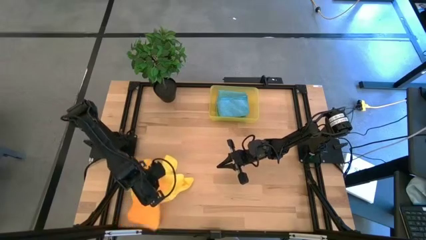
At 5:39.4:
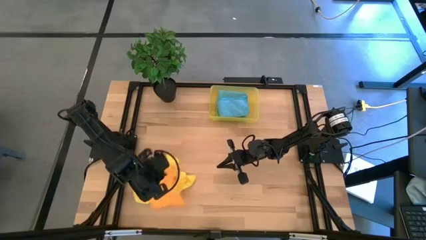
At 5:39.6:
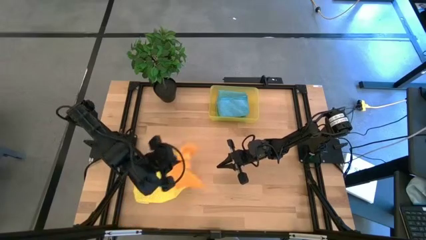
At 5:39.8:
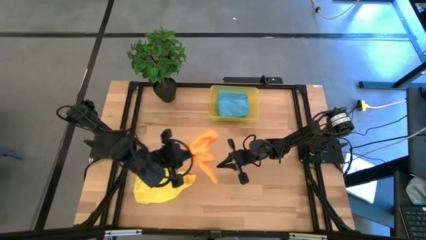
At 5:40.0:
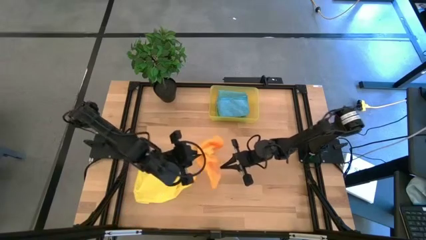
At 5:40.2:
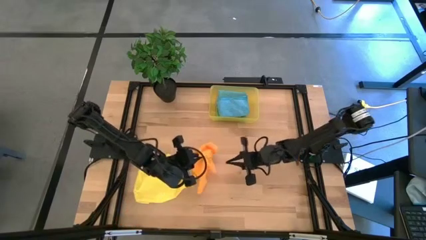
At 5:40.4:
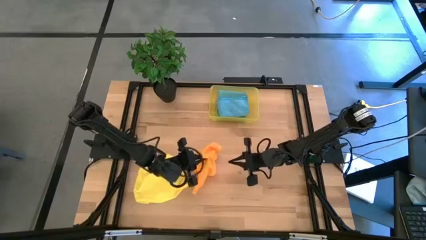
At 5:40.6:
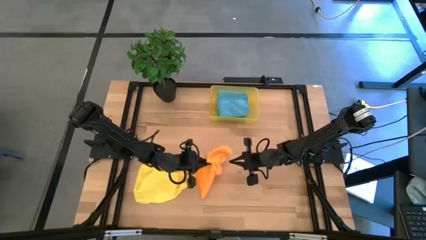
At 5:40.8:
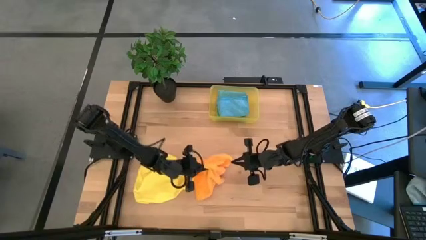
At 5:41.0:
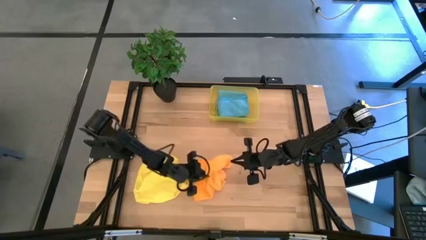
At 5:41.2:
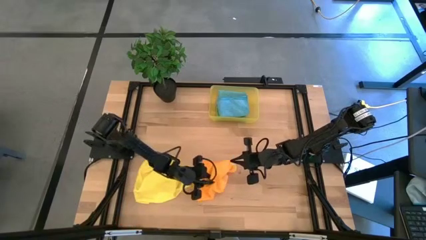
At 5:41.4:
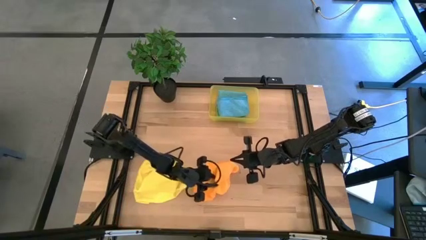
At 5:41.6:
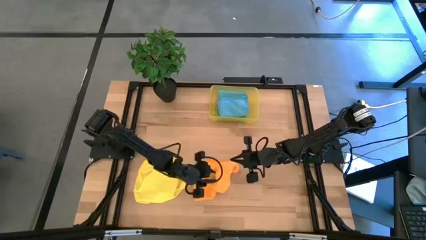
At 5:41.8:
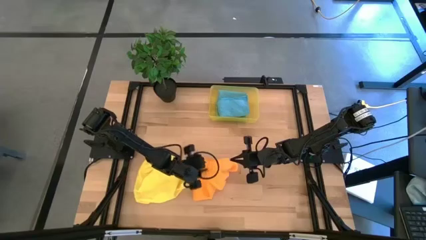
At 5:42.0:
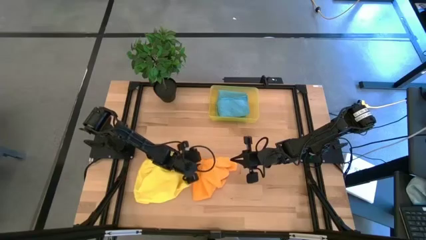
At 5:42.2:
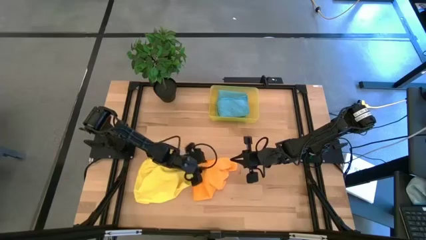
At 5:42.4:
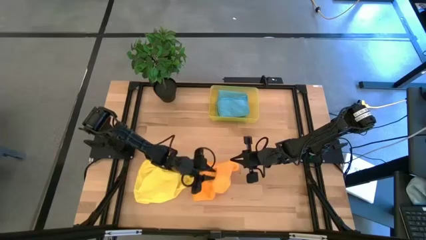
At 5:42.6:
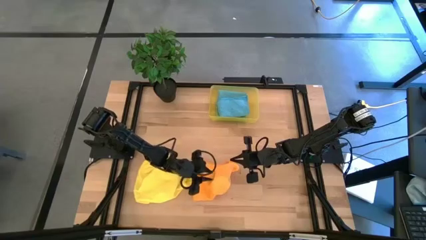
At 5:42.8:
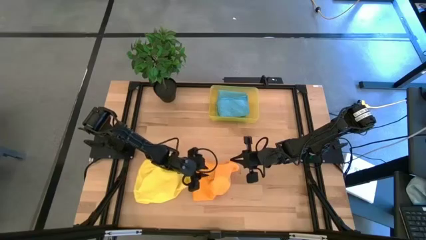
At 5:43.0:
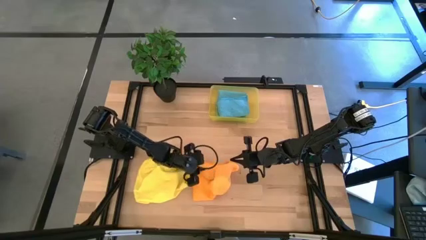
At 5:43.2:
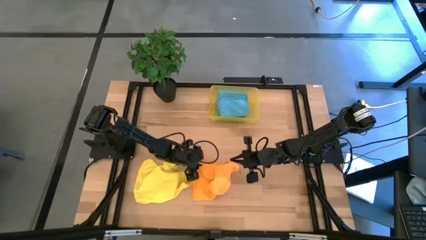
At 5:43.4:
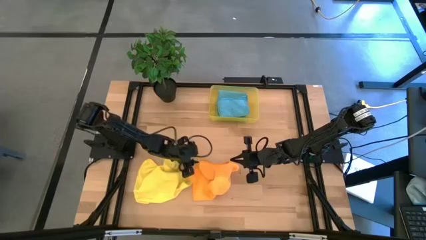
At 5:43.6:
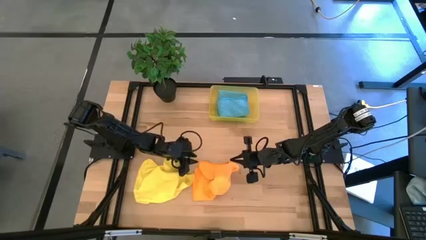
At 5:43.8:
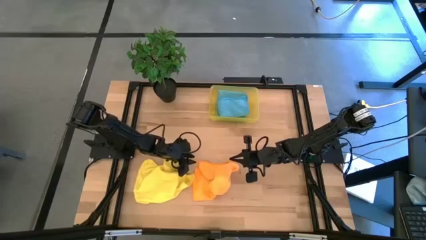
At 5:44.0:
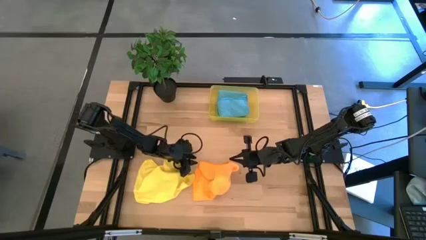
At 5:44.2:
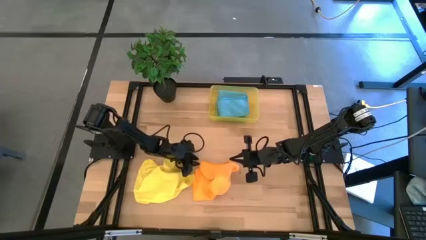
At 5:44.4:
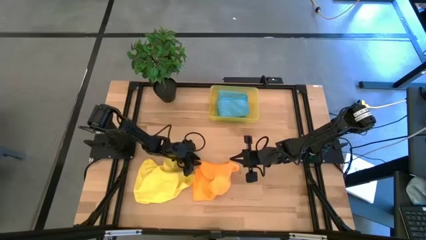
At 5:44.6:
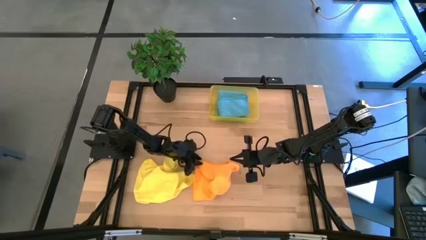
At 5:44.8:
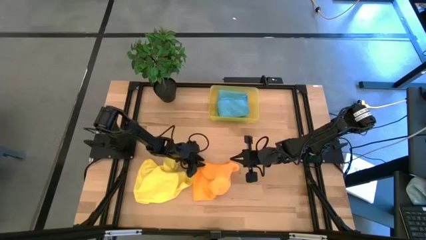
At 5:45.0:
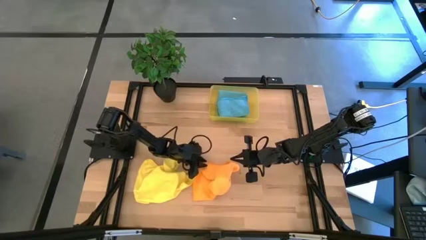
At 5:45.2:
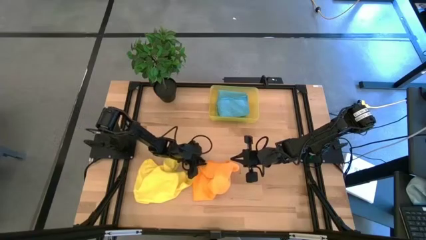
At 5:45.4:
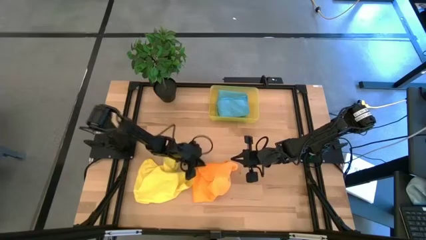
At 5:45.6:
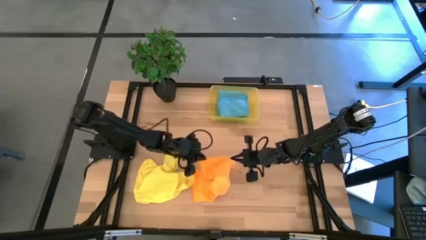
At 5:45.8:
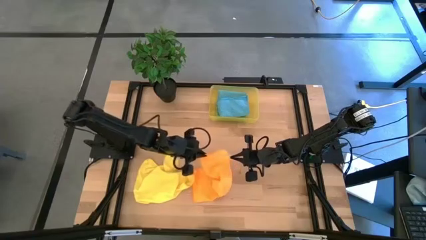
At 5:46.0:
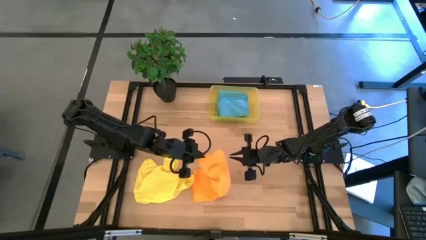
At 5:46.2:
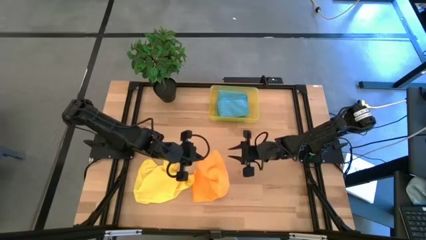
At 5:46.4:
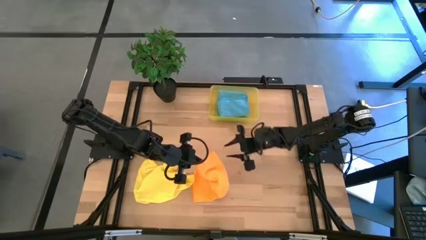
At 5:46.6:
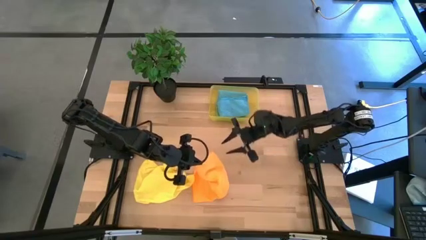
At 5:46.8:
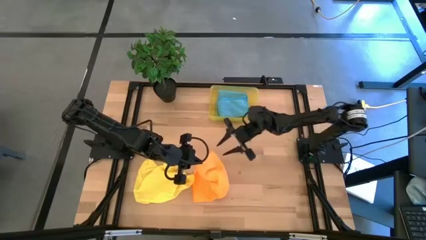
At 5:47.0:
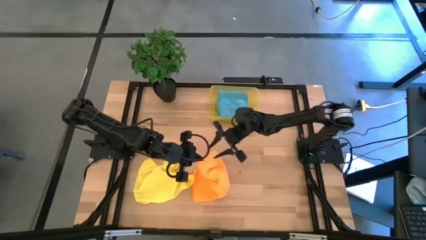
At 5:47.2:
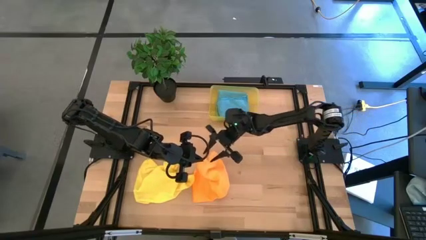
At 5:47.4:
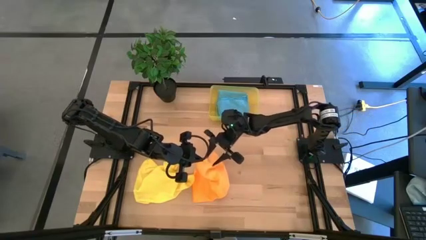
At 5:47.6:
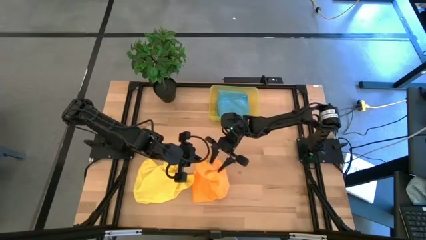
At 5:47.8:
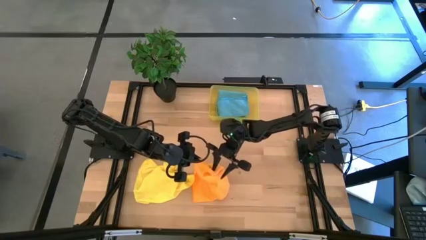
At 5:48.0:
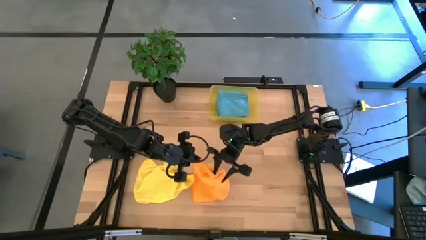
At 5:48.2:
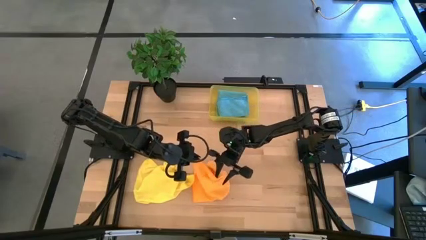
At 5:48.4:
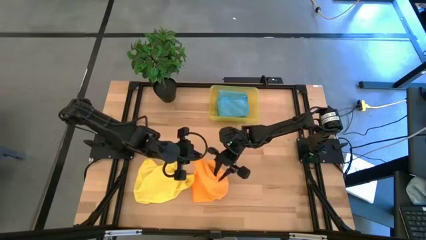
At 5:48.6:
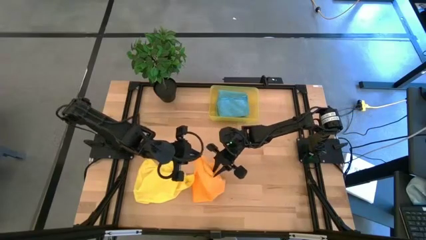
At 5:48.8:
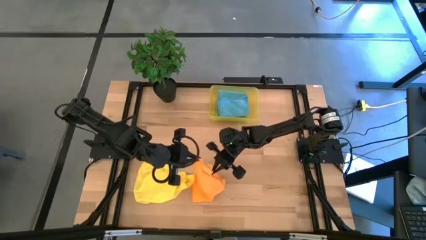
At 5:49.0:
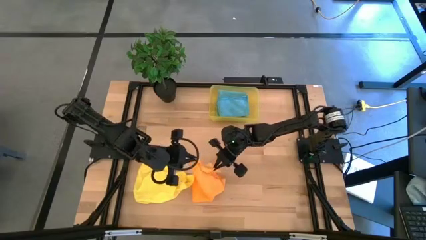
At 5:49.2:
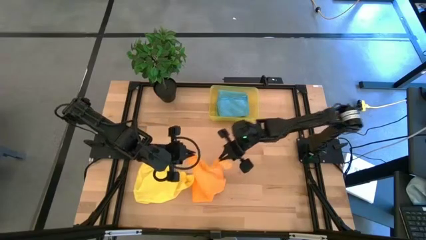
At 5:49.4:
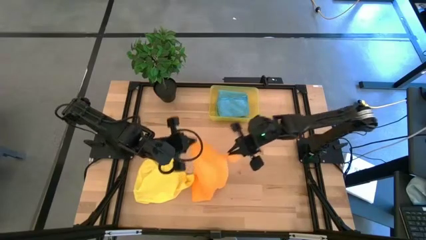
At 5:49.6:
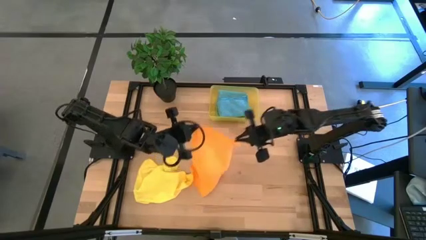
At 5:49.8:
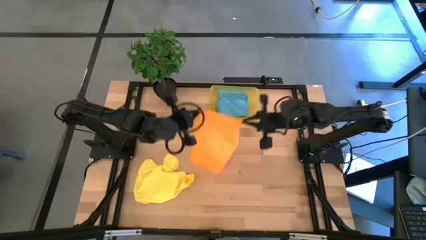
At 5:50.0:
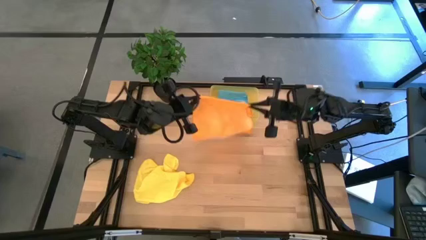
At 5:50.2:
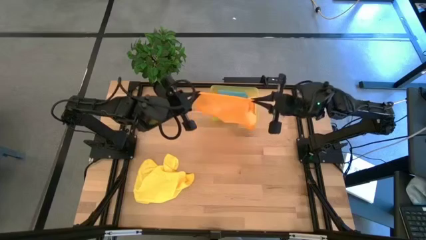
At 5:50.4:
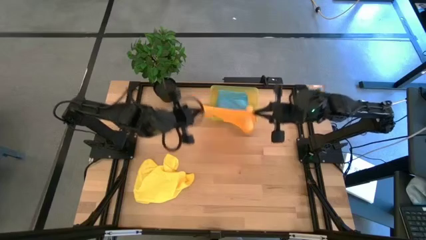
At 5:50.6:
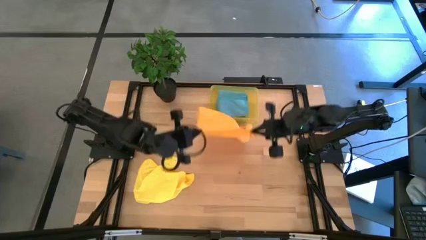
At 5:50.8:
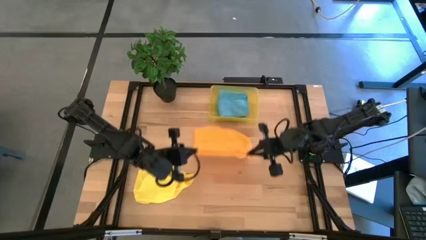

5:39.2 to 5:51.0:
Task: Fold microfiber towels
Fold the orange microfiber towel
